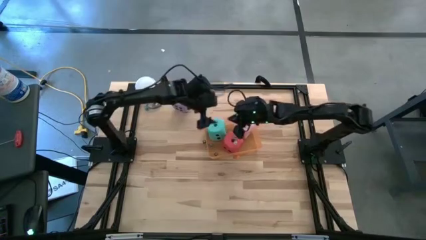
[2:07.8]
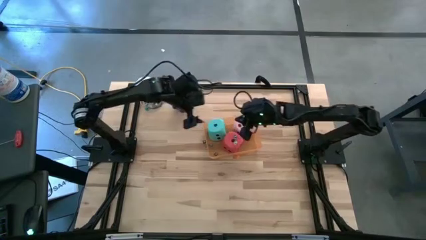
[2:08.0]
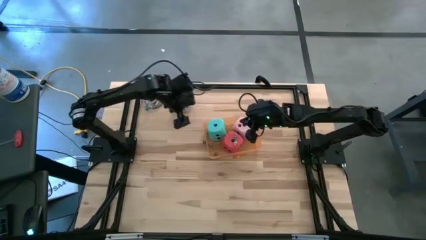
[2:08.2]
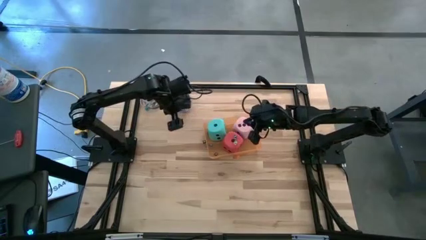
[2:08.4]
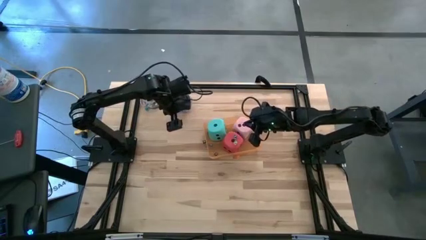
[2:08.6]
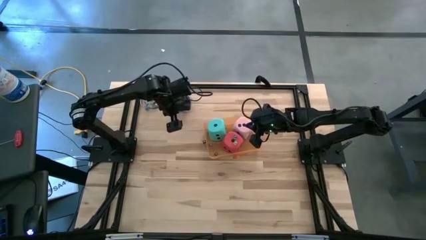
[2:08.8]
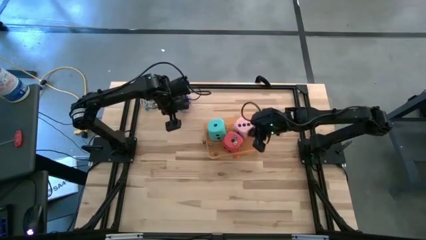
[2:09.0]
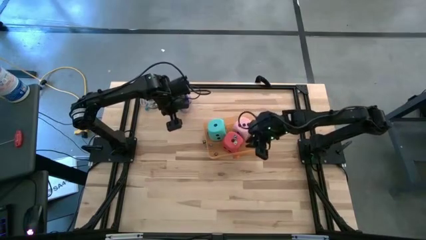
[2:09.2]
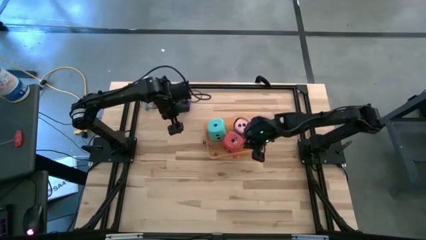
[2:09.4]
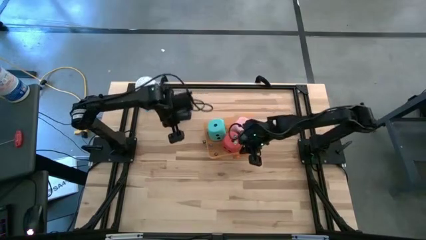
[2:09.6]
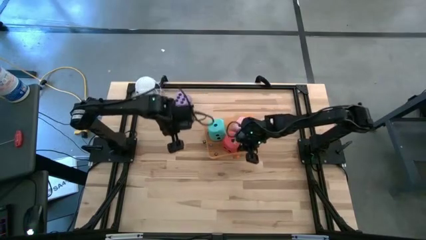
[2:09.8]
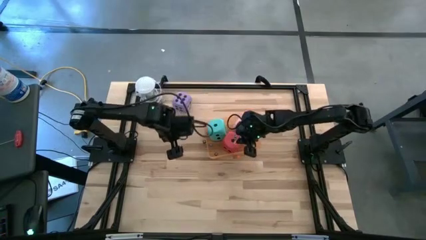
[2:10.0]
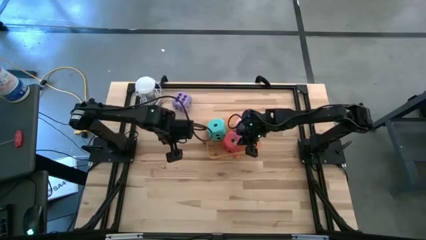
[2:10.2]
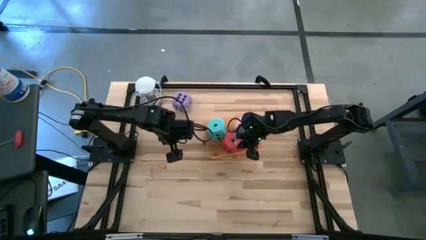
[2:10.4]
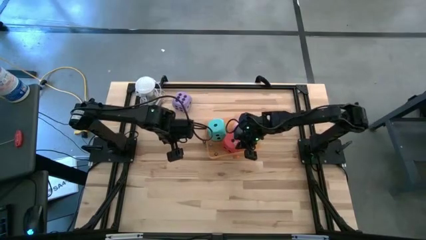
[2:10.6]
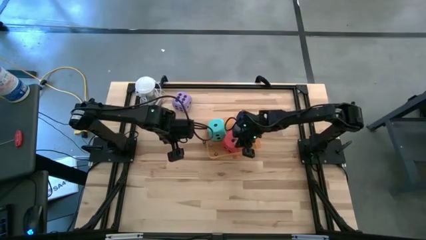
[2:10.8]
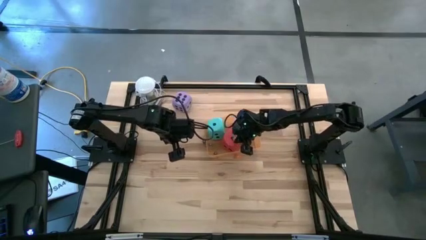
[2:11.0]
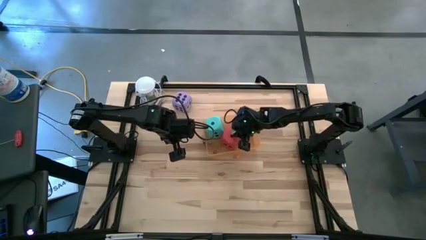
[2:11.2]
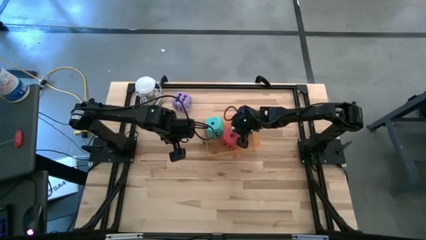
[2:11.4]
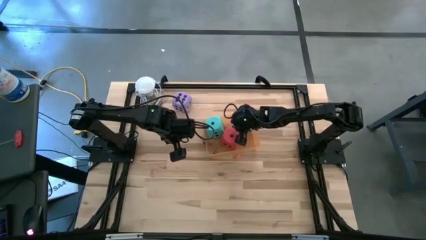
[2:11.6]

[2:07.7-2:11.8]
Task: Pick & Place Dice
Adjust the small green dice in the orange bin

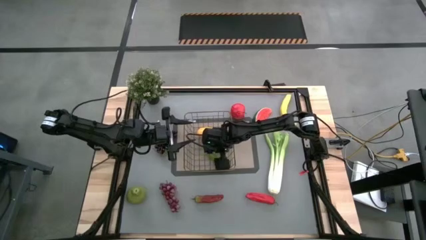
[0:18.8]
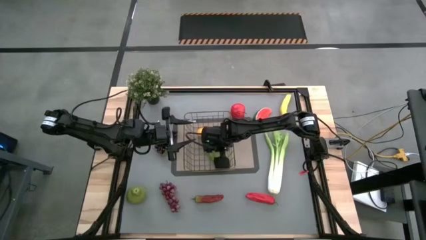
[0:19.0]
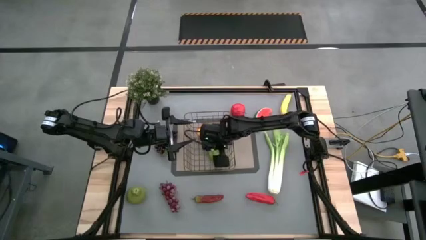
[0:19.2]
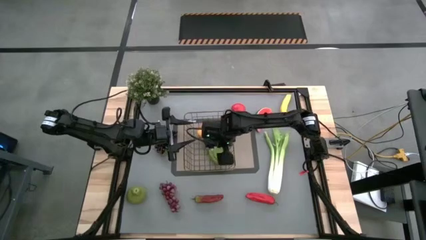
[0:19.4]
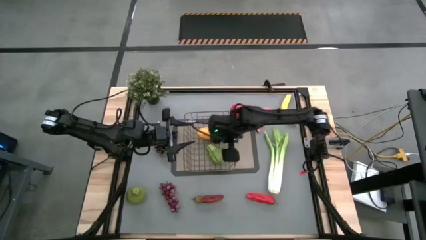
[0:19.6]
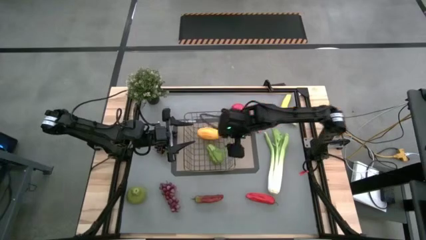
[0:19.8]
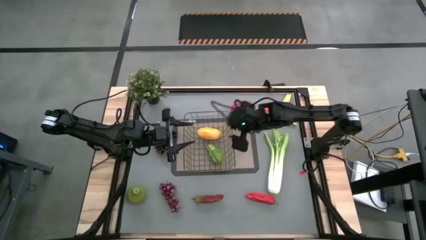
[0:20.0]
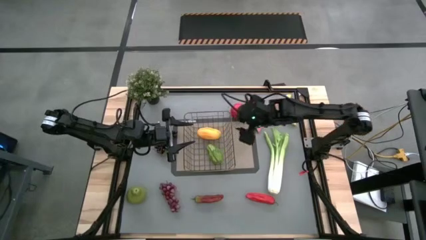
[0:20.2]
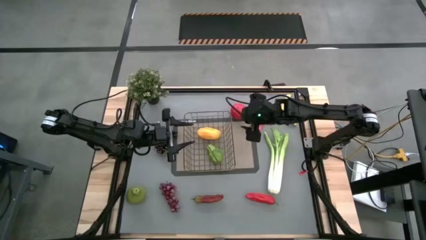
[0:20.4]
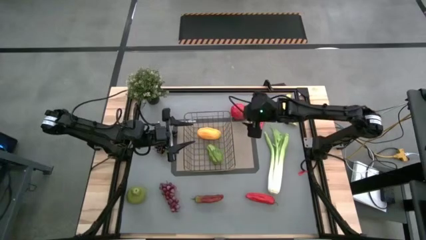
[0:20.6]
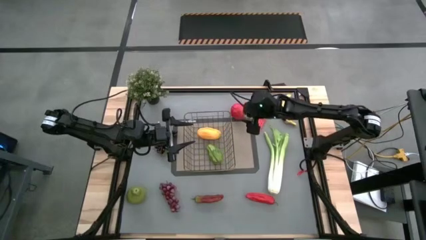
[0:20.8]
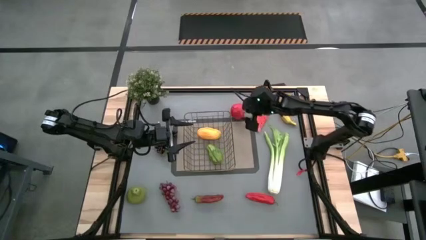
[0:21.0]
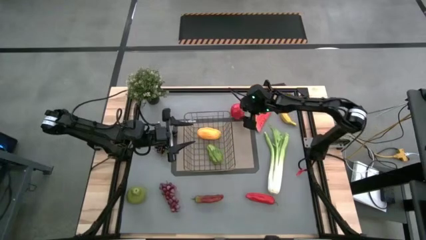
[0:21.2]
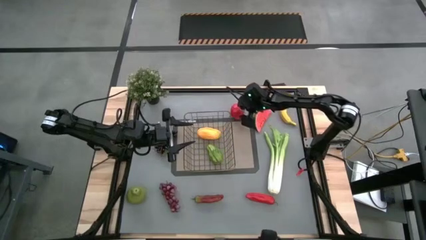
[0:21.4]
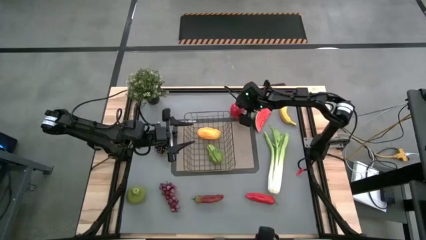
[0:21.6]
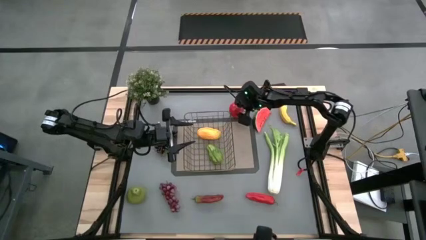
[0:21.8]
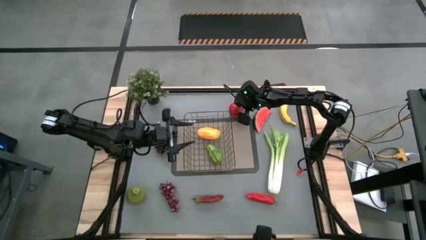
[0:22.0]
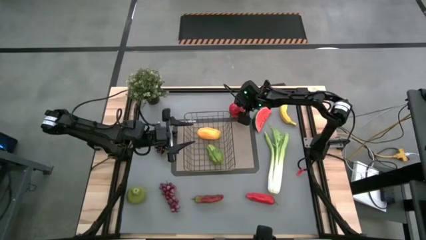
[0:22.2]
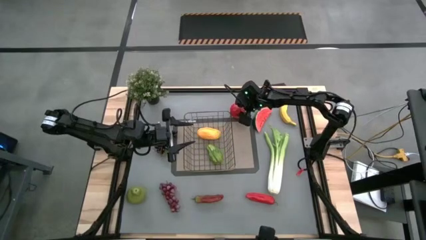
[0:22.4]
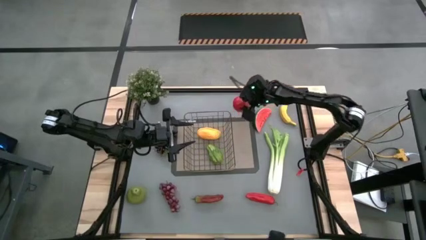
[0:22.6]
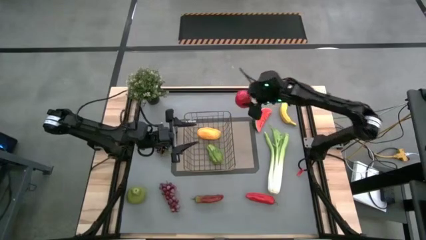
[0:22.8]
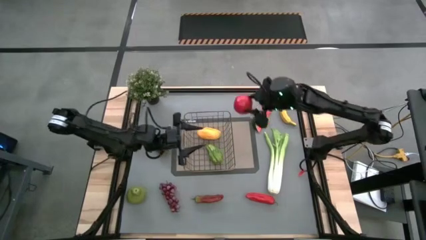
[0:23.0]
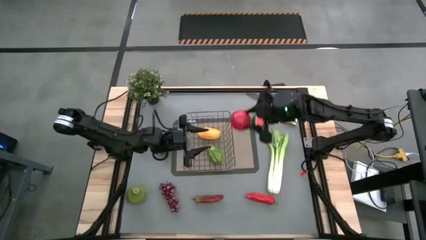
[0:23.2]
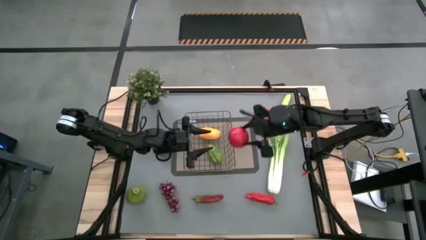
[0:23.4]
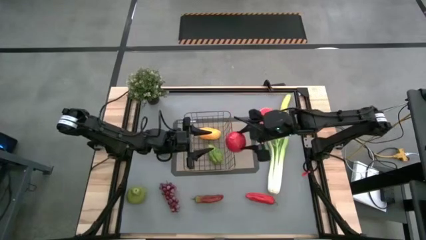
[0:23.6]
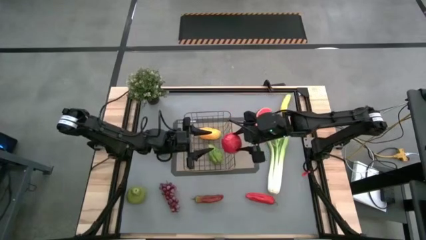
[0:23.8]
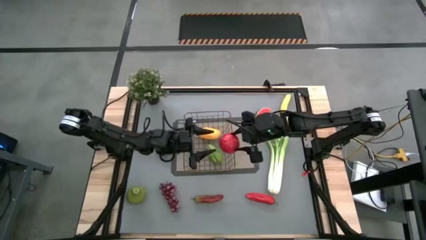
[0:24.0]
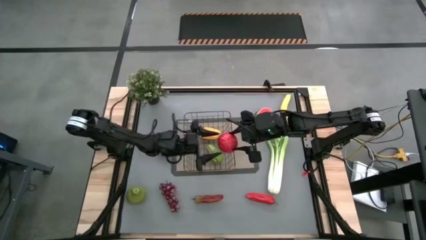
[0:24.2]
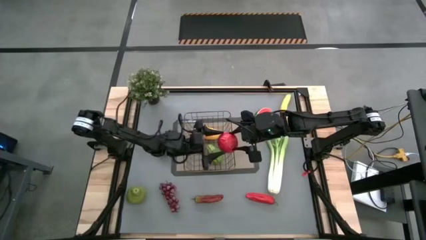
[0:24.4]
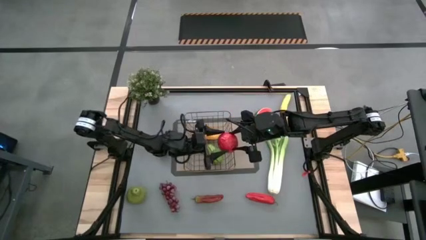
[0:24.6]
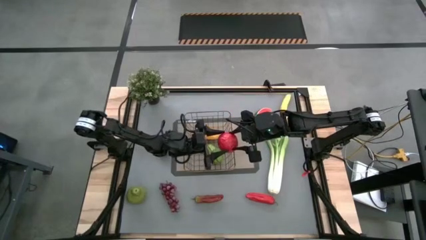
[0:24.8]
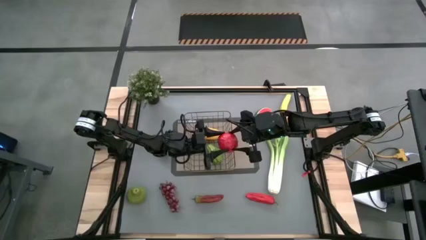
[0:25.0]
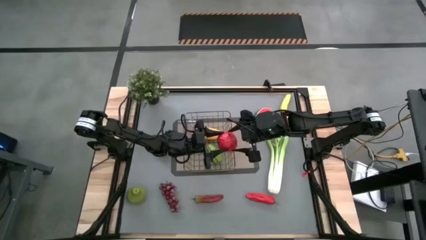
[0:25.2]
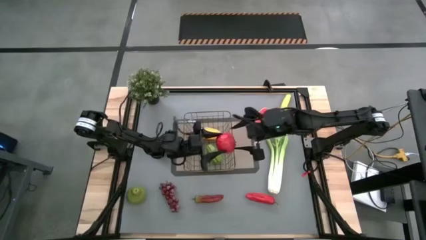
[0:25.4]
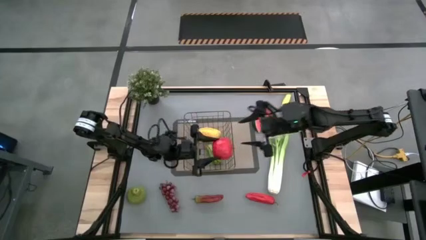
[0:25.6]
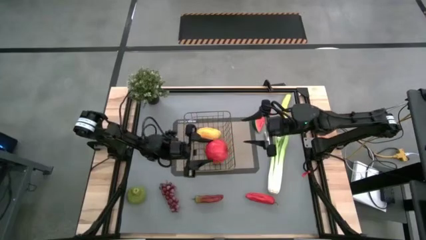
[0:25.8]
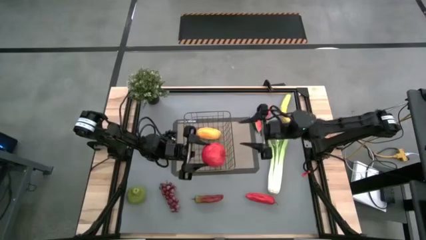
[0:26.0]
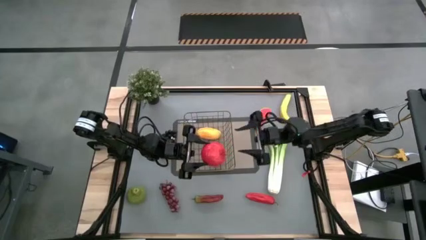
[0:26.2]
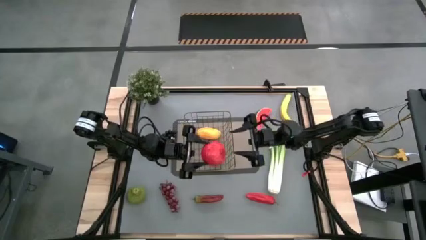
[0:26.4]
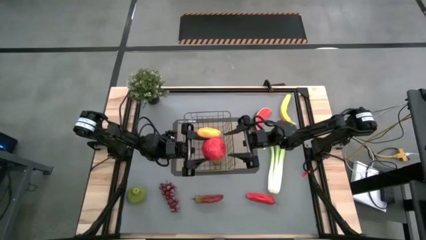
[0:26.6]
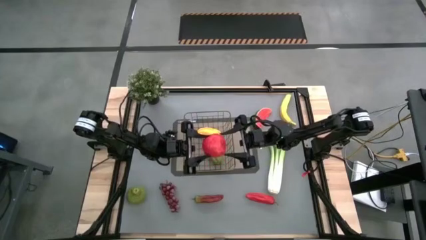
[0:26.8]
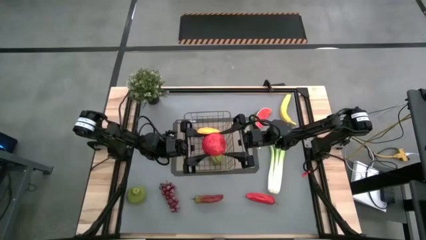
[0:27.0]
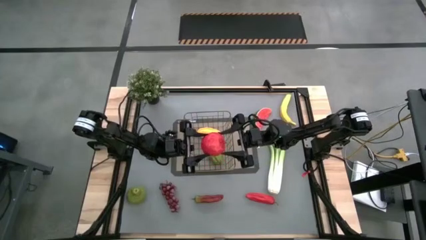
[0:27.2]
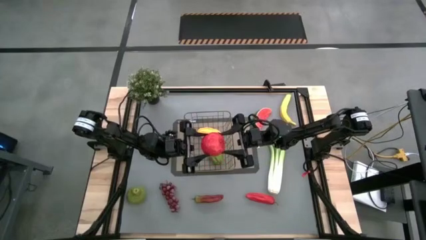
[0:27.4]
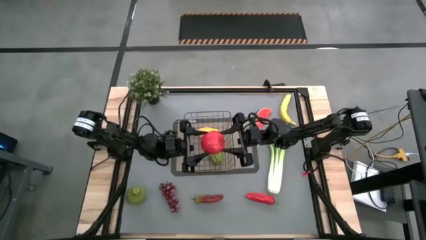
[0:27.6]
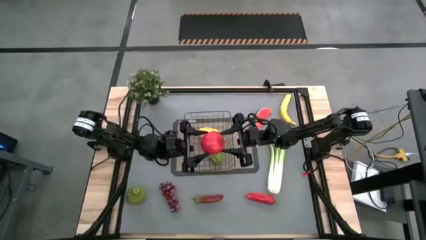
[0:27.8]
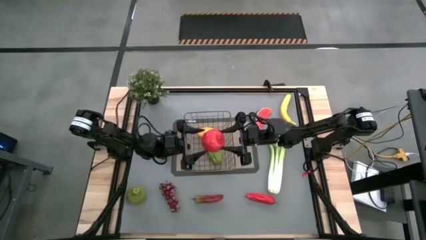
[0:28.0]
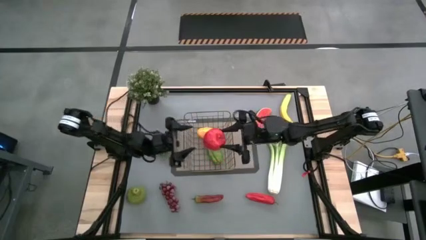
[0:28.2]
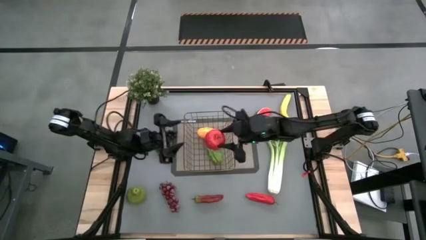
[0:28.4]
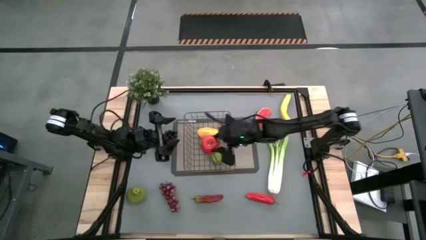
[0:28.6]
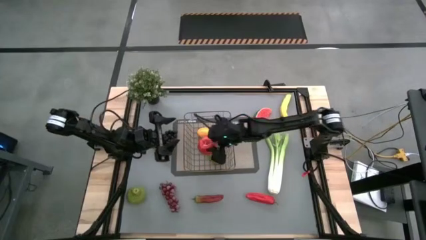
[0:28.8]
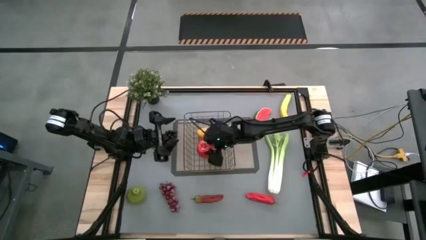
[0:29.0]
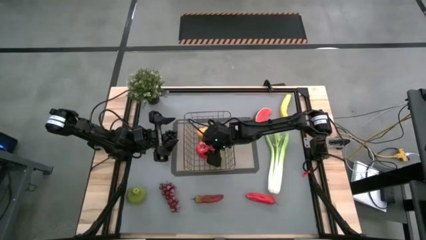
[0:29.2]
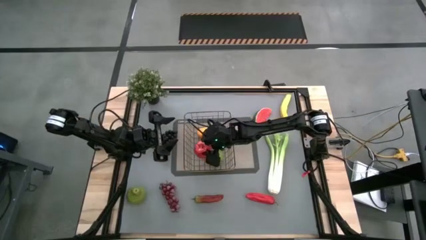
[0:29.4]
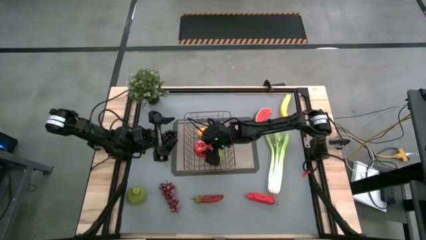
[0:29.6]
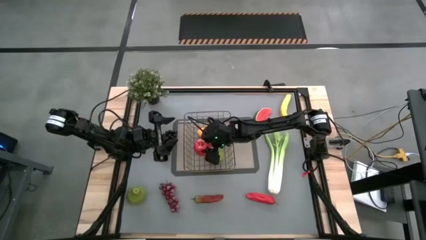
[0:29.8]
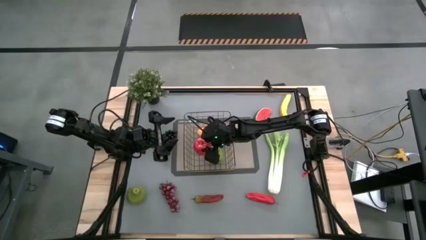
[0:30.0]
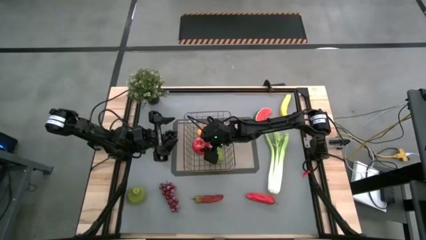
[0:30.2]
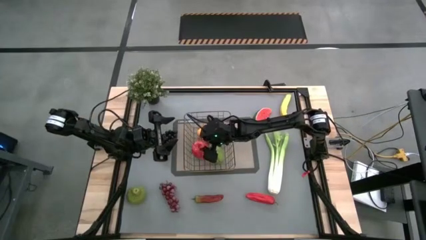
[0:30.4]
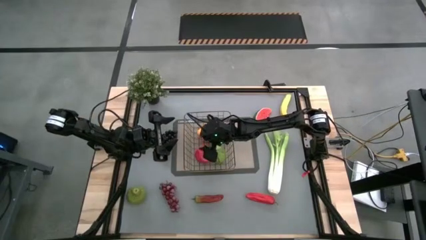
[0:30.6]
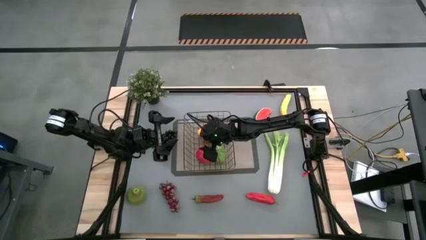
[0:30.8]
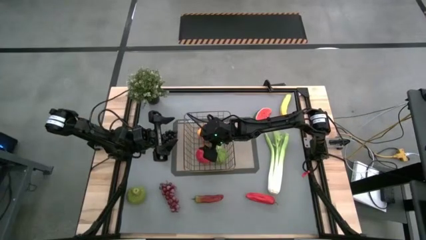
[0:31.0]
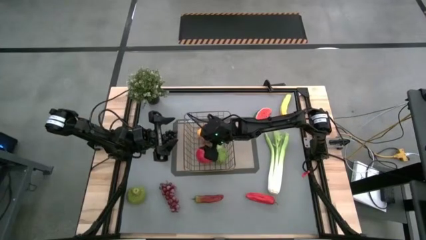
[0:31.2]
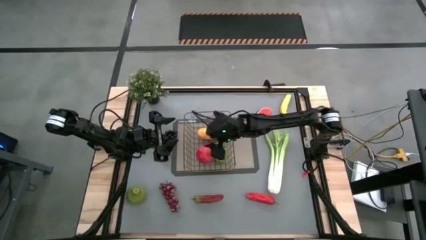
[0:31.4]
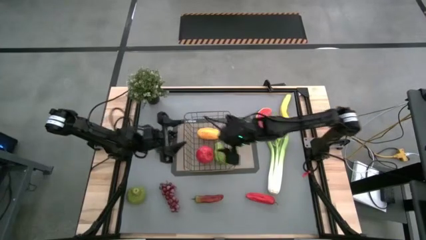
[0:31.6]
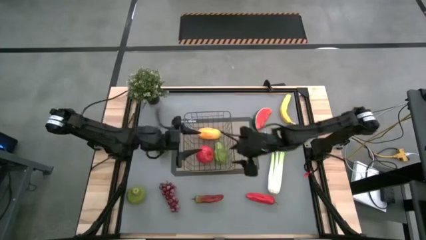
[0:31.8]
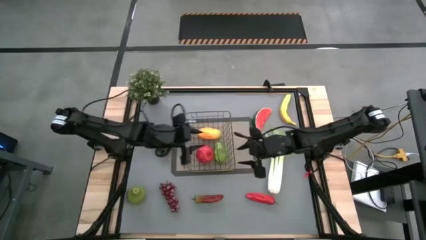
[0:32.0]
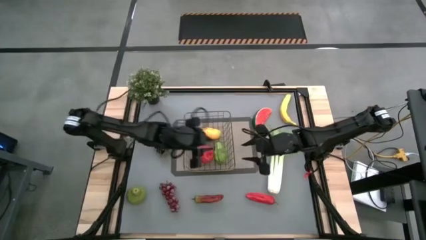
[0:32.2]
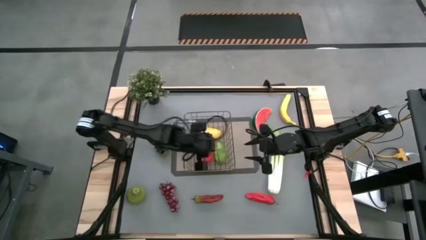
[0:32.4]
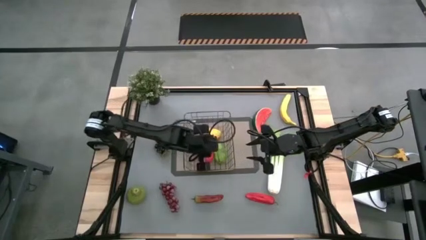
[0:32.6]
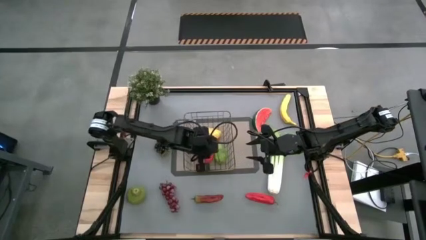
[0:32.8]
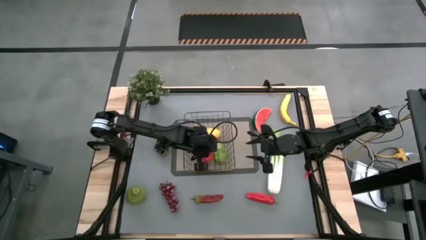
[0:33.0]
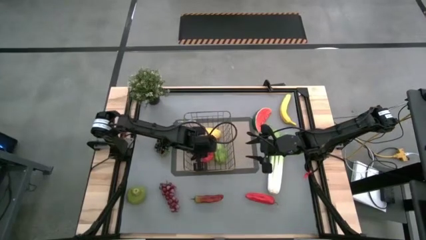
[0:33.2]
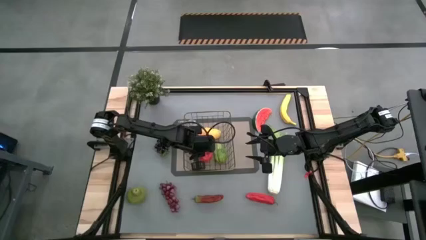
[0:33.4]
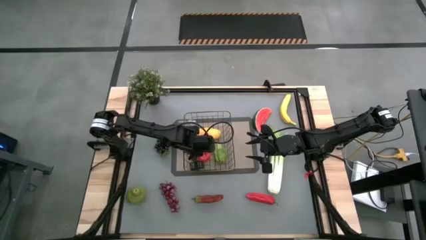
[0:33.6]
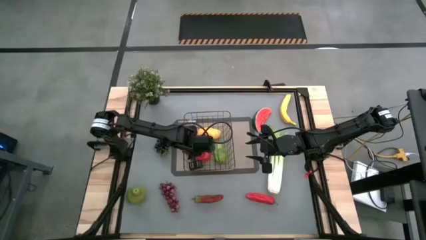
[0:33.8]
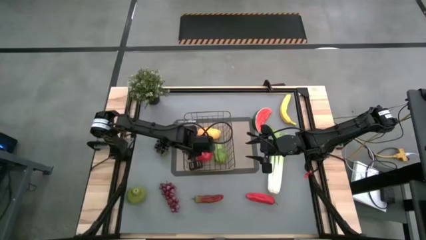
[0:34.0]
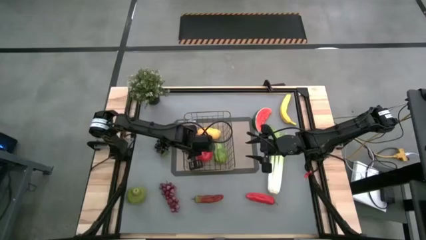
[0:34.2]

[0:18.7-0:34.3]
Task: Build produce basket
Put the red apple into the wire basket
